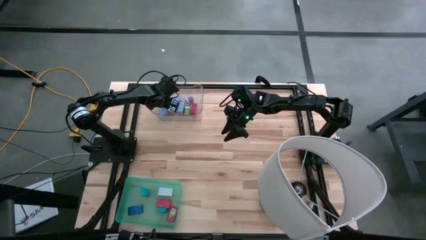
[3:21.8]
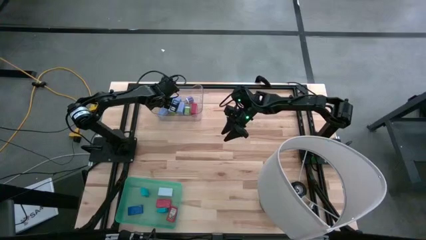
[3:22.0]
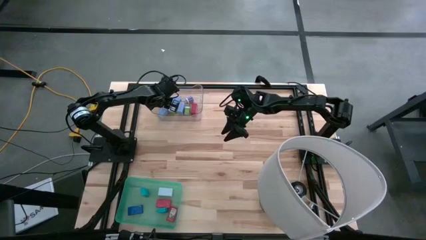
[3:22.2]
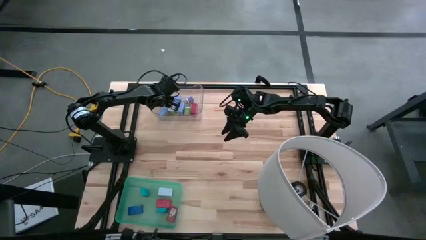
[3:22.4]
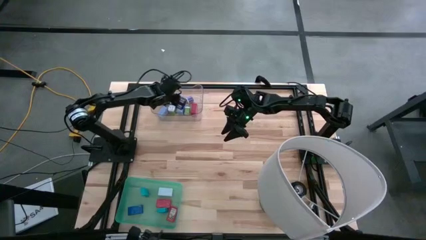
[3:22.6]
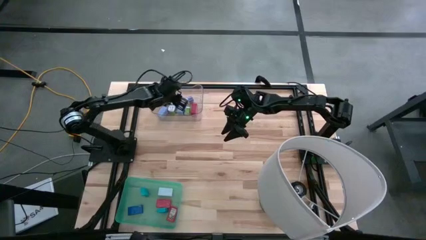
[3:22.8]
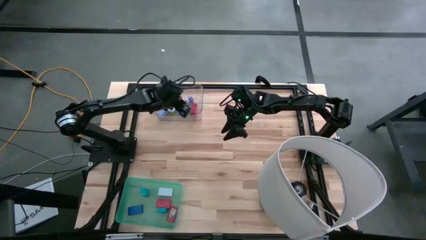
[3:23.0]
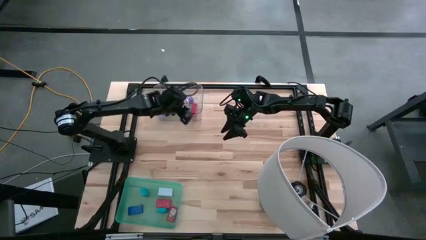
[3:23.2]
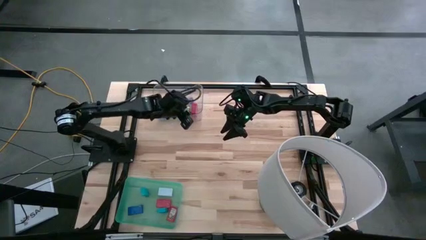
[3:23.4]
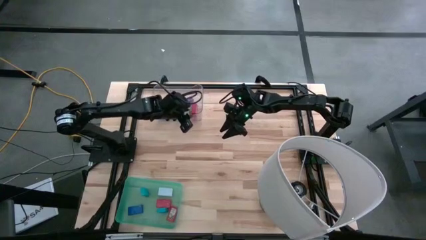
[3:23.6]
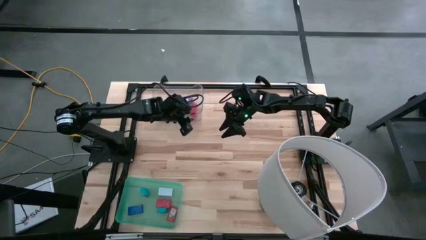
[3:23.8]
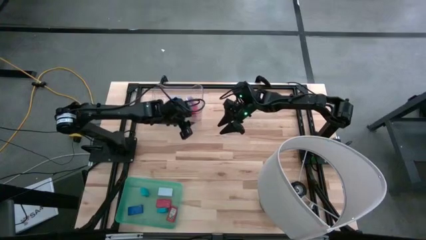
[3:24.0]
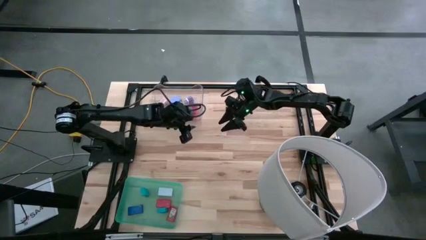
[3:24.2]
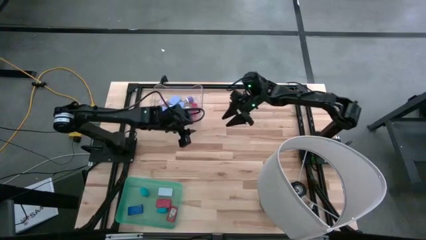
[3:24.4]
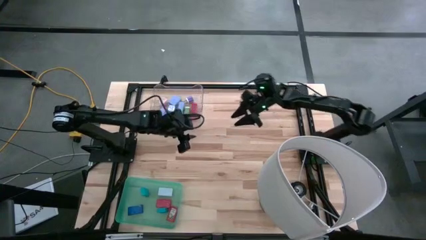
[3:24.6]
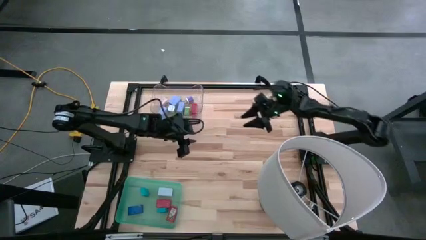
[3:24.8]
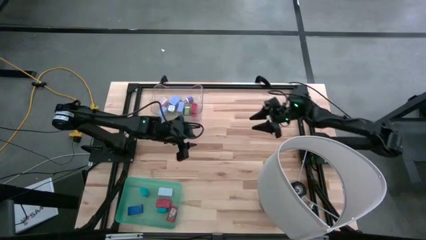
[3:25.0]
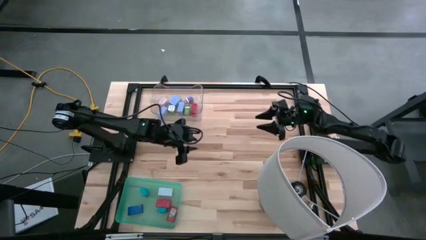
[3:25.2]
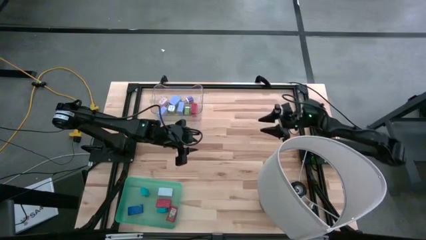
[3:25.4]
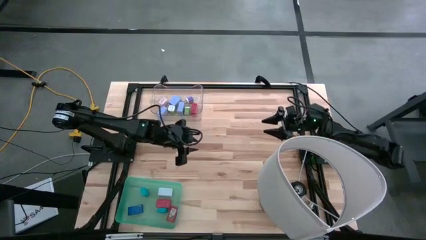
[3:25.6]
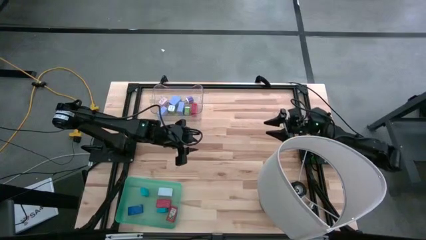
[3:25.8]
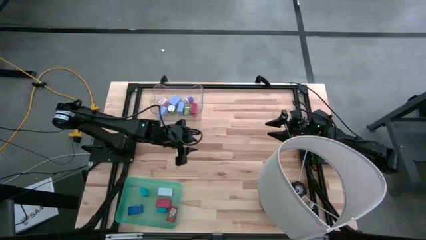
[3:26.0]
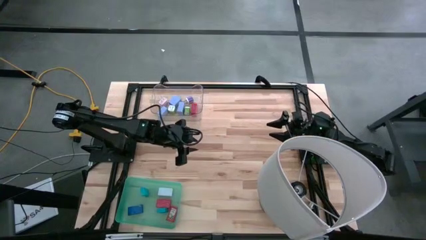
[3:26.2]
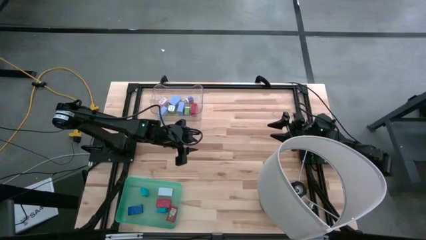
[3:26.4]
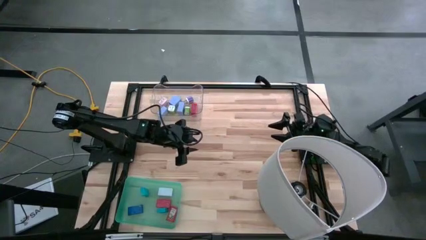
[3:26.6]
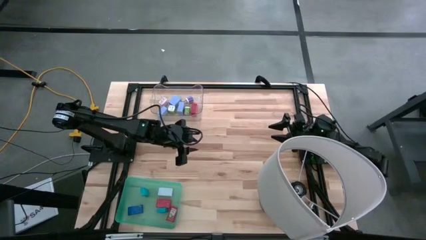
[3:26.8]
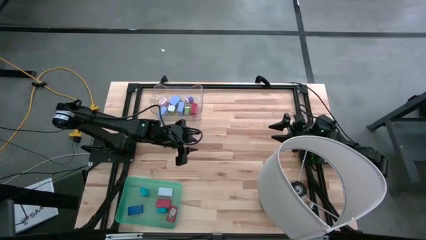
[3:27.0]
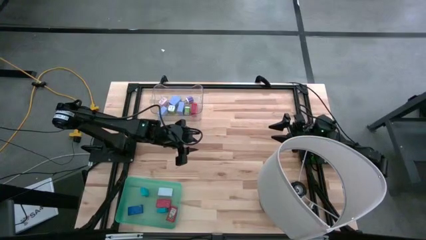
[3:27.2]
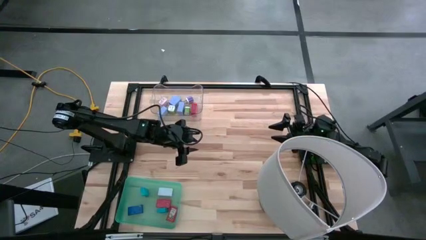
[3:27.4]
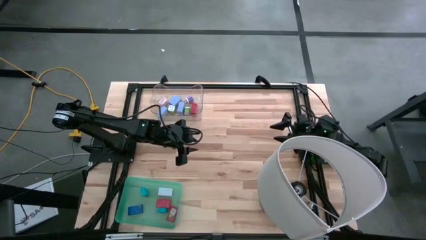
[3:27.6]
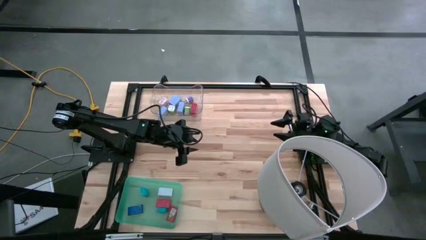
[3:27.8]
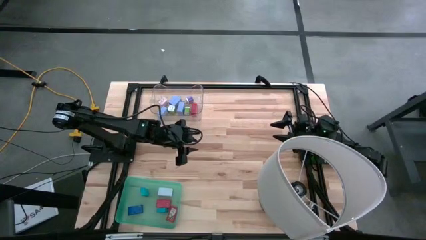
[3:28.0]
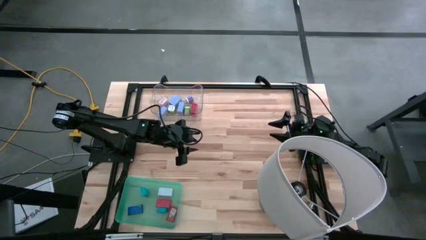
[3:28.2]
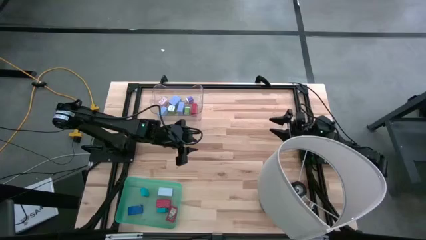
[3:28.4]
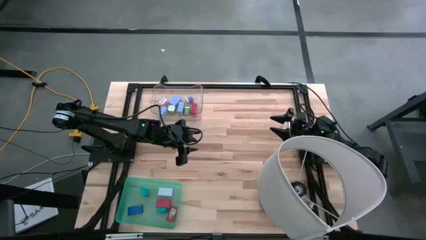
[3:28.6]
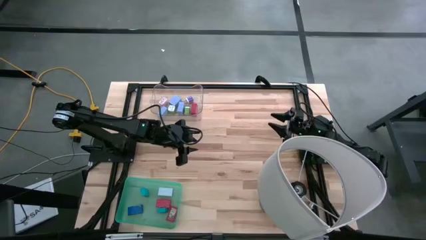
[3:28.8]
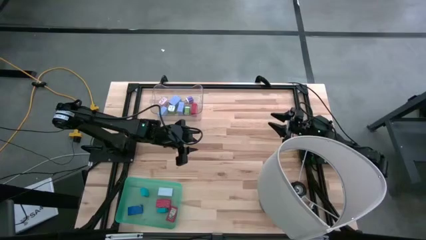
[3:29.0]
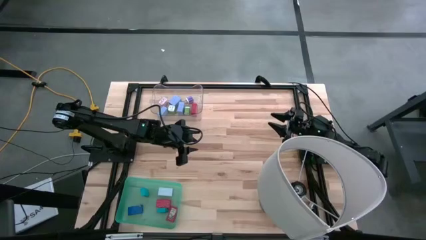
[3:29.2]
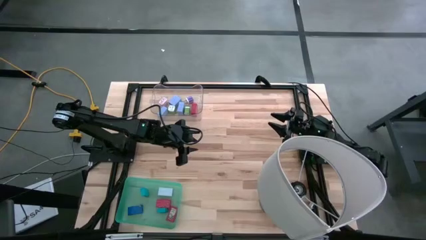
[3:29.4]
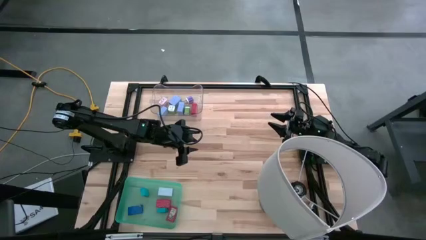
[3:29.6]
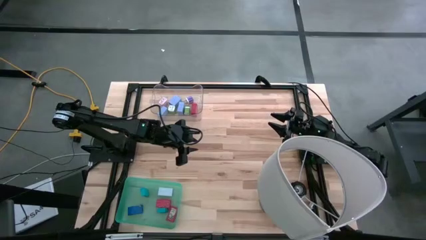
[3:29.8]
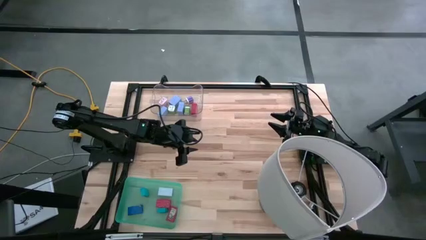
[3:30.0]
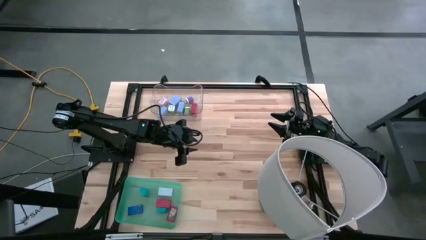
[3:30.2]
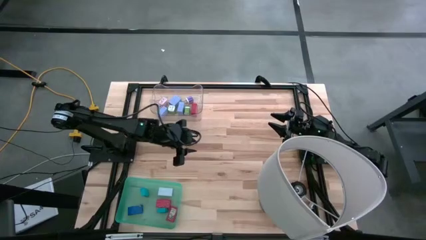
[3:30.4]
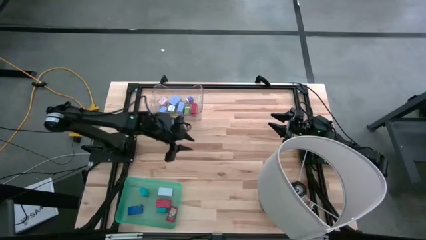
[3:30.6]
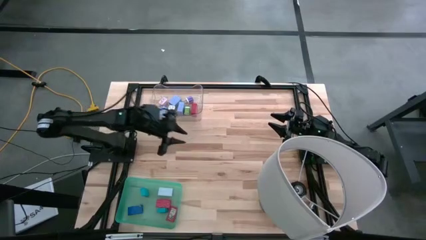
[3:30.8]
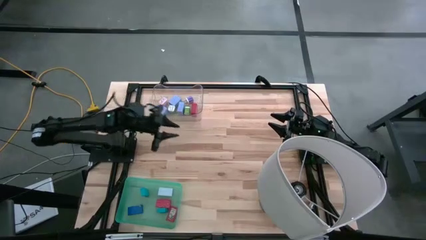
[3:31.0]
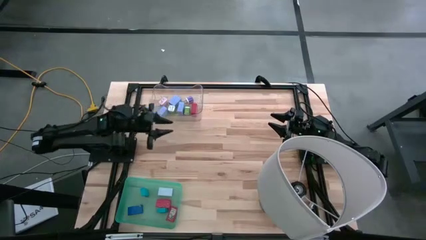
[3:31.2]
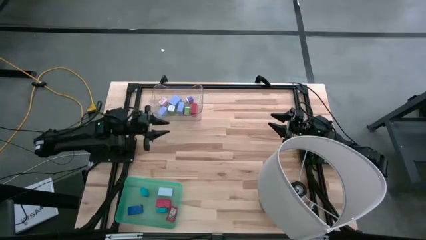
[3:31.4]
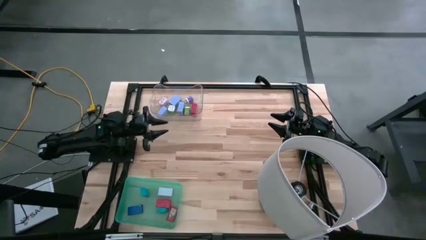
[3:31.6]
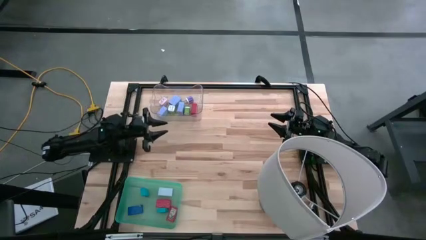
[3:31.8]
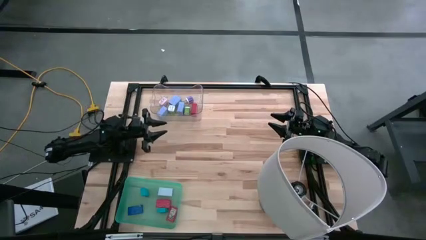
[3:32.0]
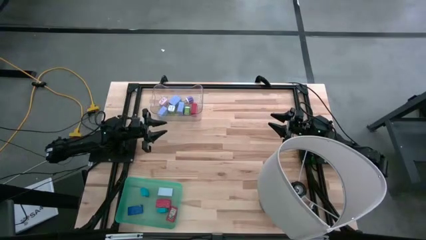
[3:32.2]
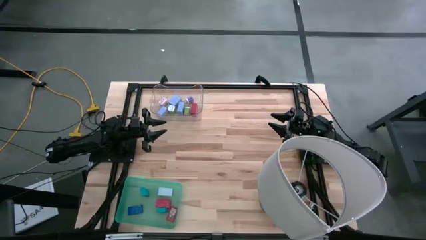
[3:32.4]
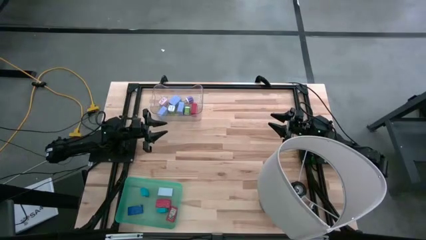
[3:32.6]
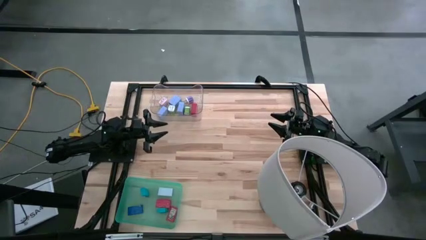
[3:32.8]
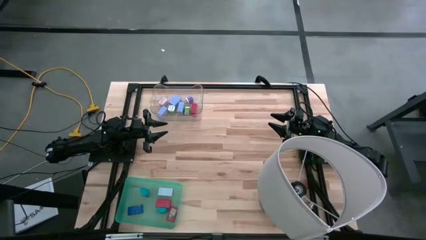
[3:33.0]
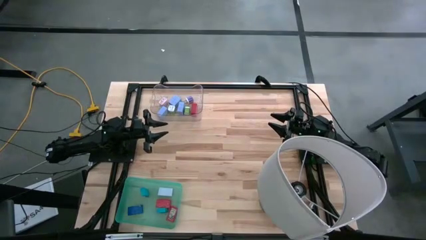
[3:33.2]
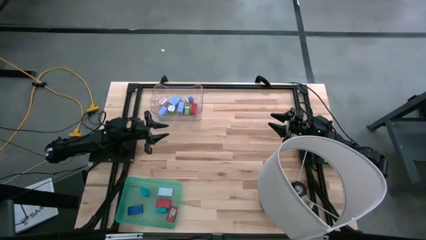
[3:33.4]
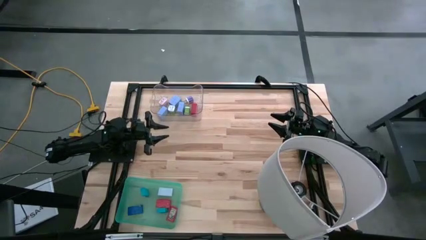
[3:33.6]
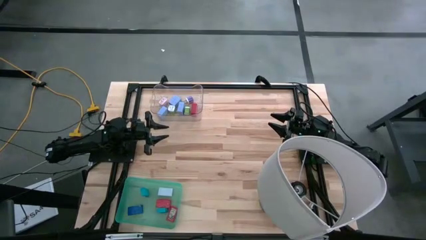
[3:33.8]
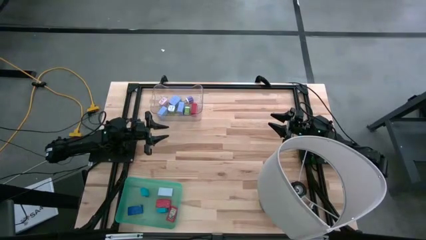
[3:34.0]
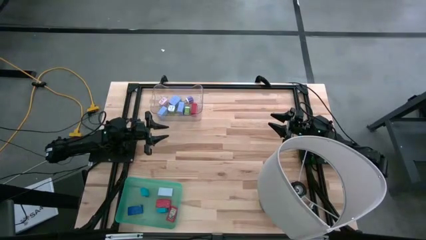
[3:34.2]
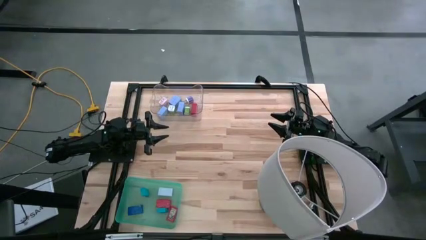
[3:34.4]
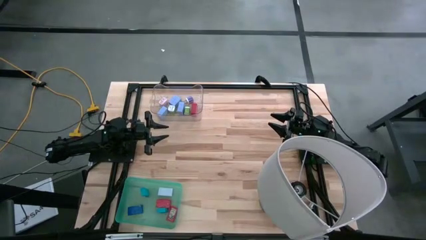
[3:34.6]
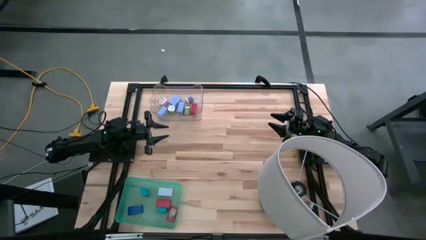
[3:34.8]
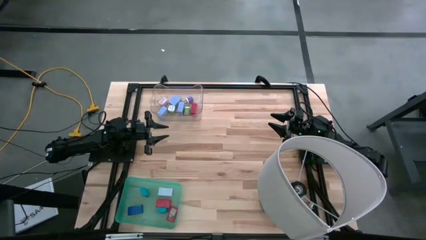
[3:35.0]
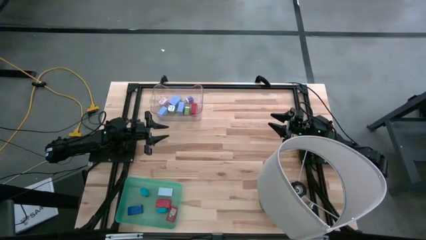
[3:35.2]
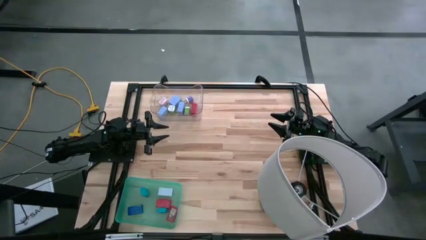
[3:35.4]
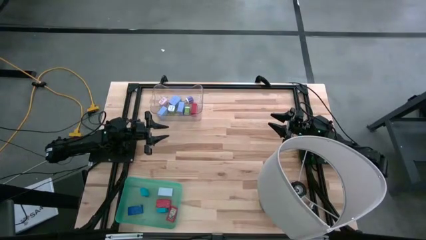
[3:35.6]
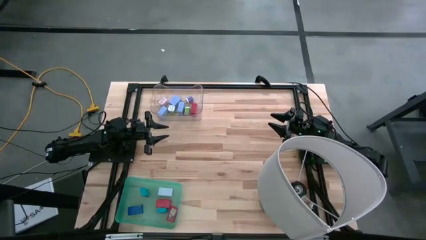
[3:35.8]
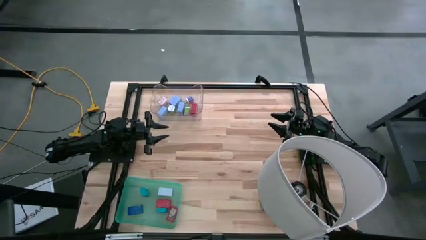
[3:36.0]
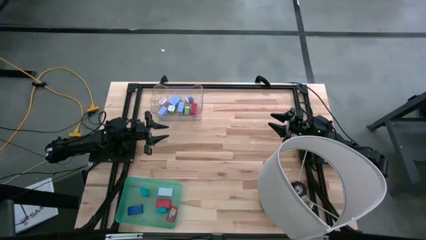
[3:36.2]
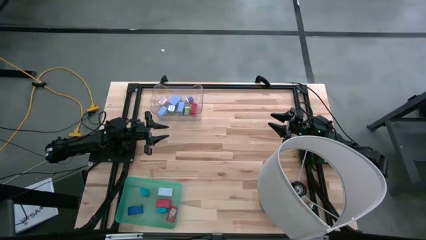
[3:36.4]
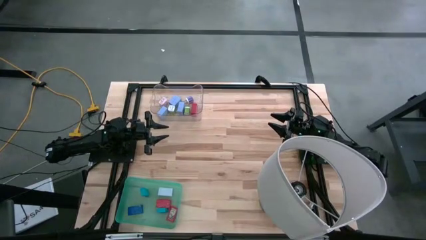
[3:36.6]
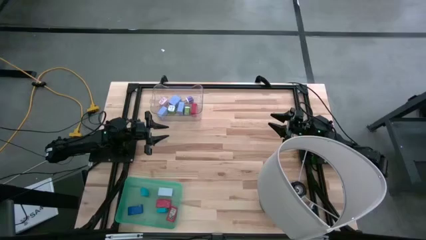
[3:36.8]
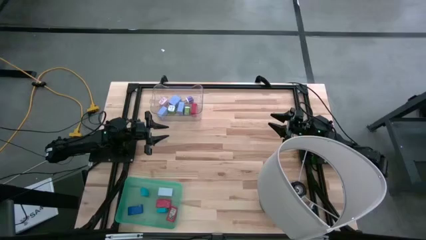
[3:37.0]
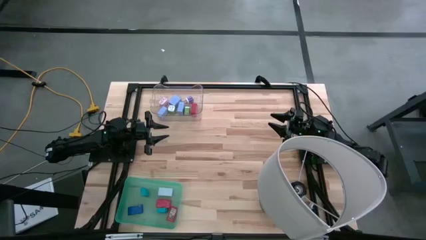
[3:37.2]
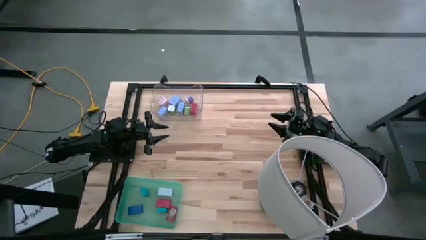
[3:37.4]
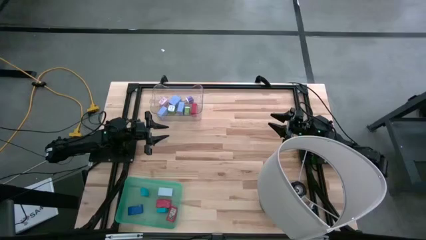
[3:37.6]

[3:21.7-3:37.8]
Task: Pick & Place Office items
Return to Home Position
